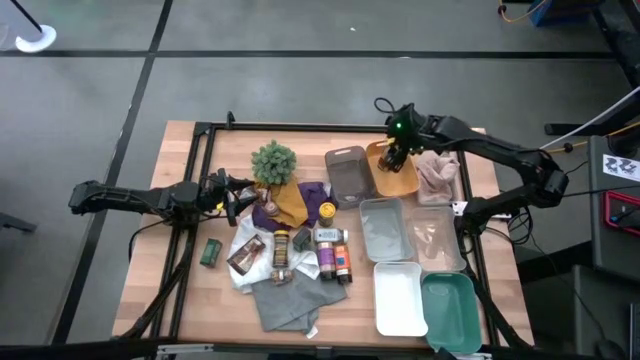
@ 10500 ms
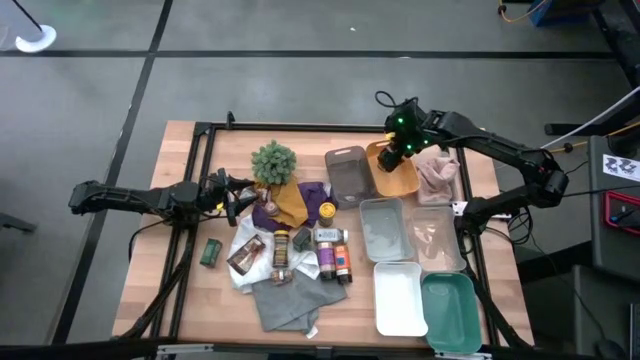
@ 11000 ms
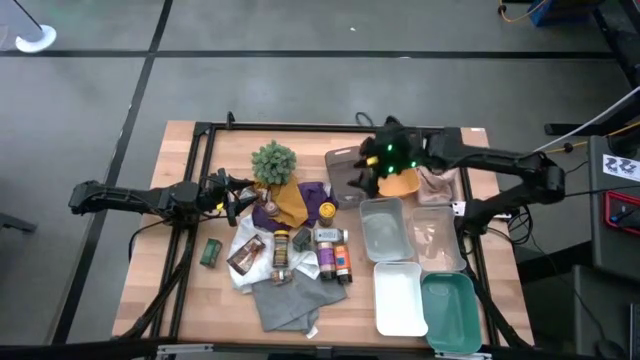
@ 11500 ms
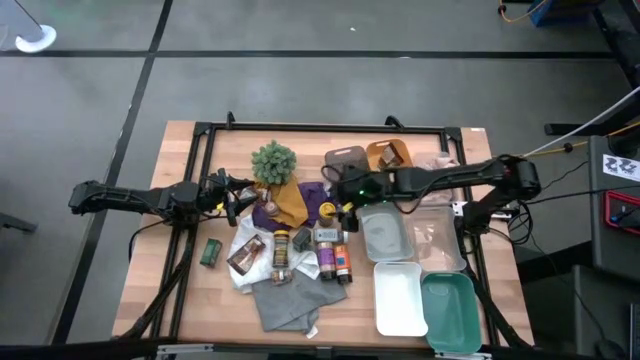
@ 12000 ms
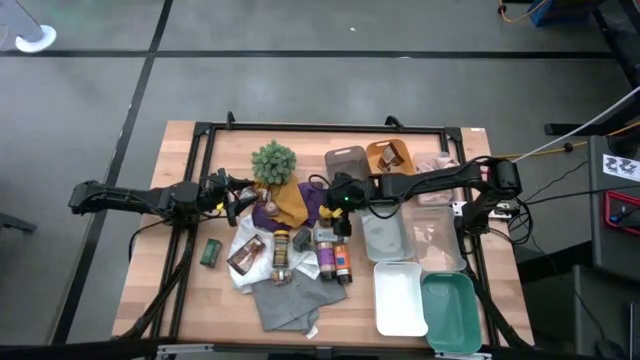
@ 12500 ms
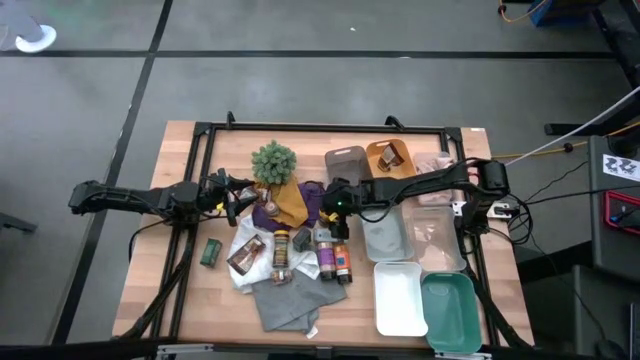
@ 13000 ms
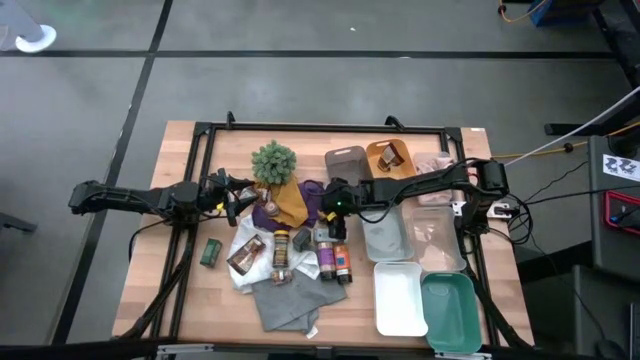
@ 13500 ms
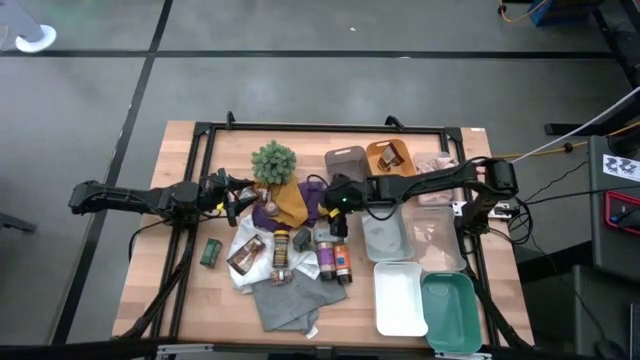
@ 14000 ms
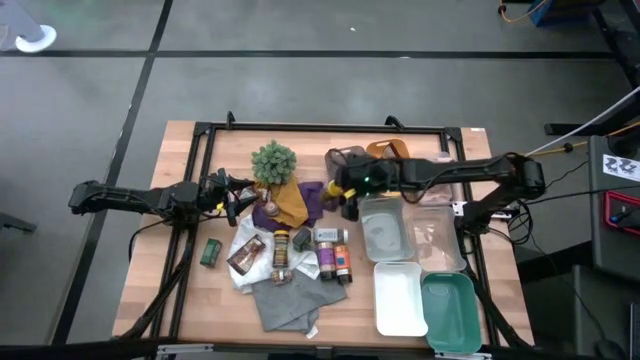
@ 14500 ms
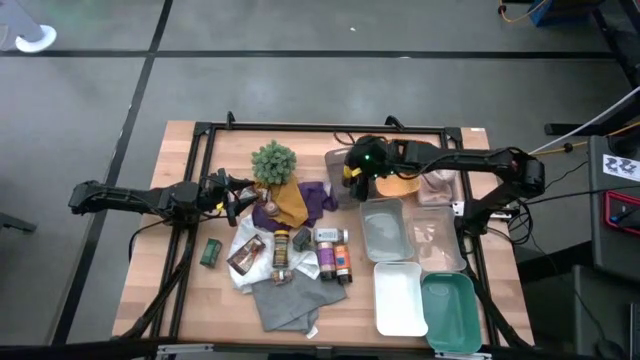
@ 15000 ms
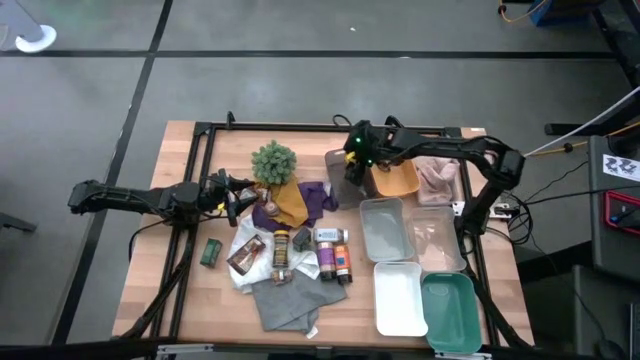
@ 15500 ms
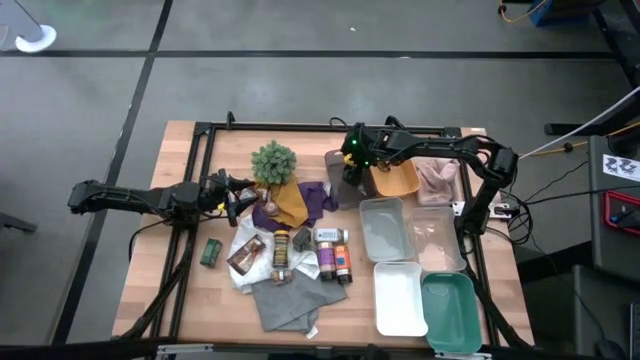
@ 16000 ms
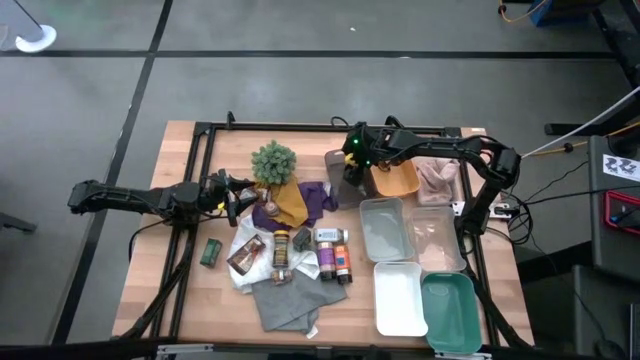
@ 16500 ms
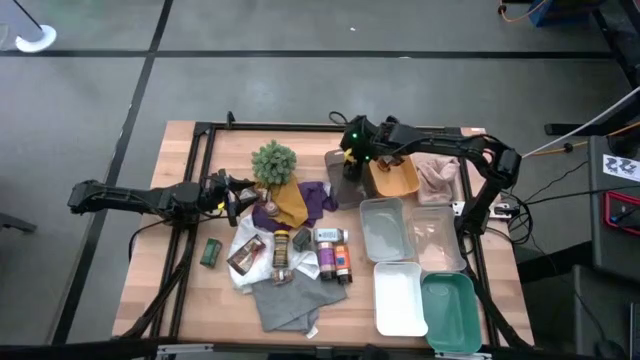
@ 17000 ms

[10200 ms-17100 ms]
Task: Sort spices by type
Put the right yellow seasoning bottle into the black bin

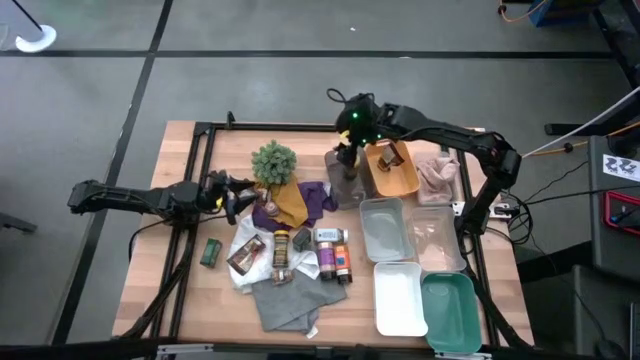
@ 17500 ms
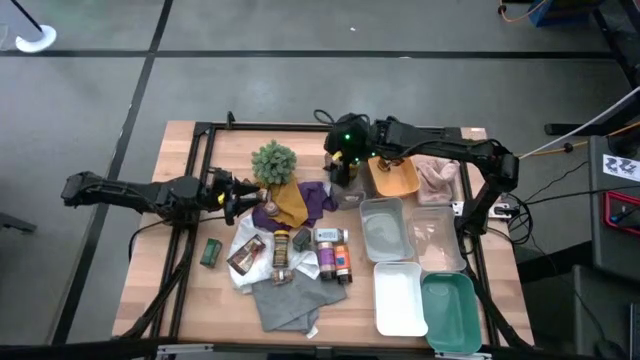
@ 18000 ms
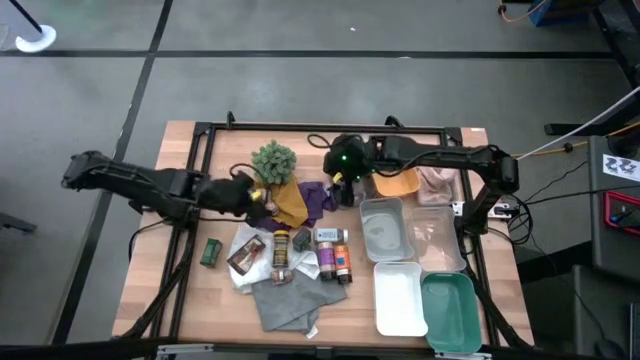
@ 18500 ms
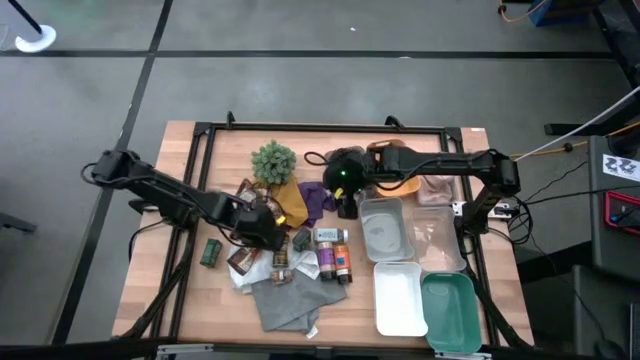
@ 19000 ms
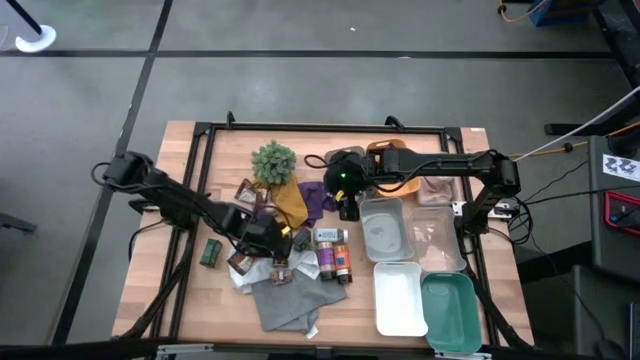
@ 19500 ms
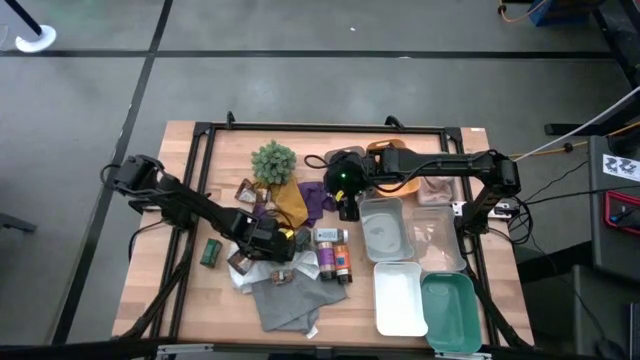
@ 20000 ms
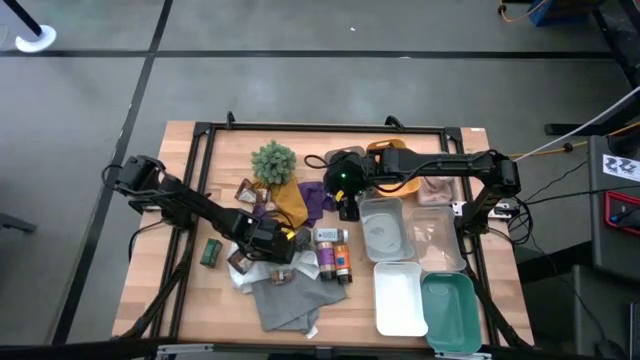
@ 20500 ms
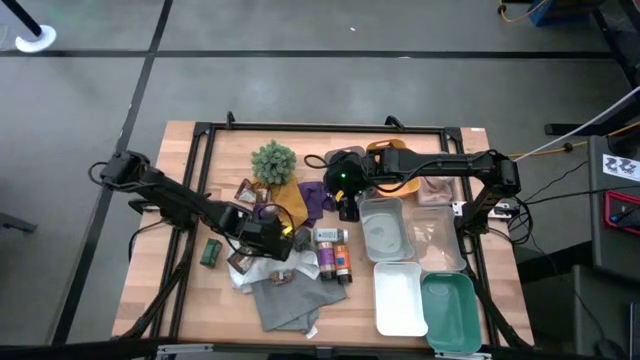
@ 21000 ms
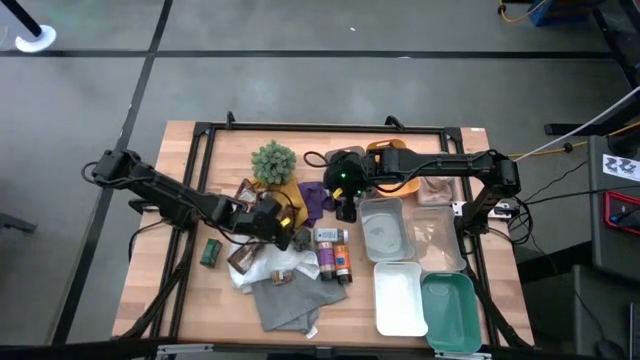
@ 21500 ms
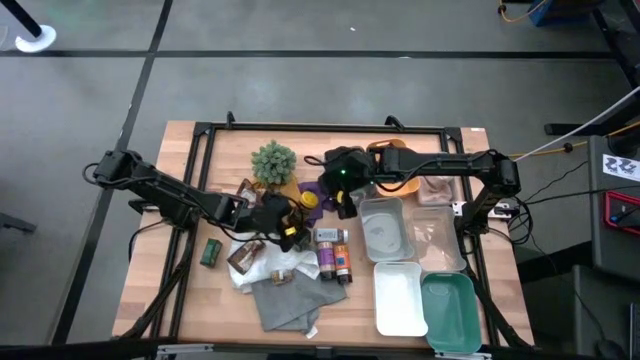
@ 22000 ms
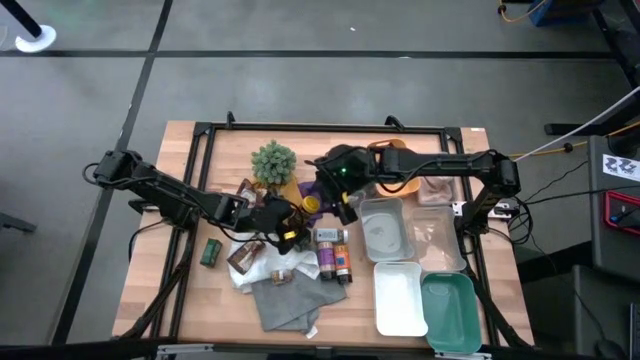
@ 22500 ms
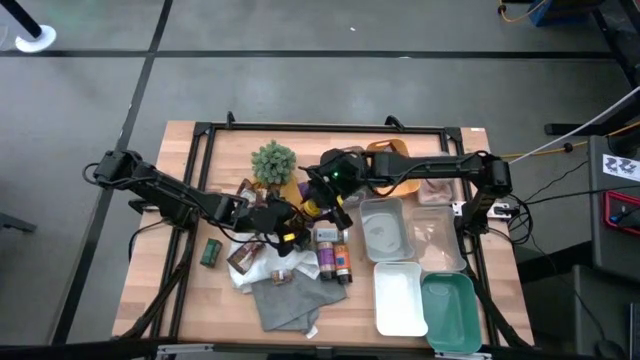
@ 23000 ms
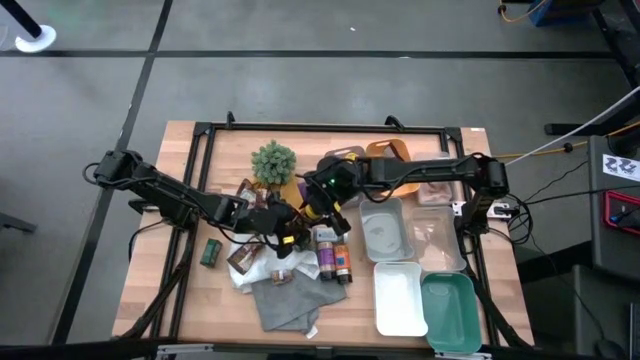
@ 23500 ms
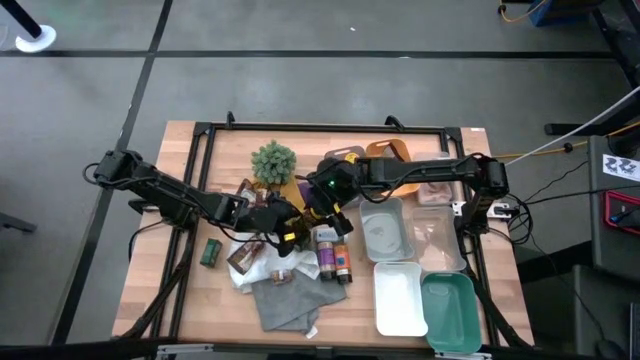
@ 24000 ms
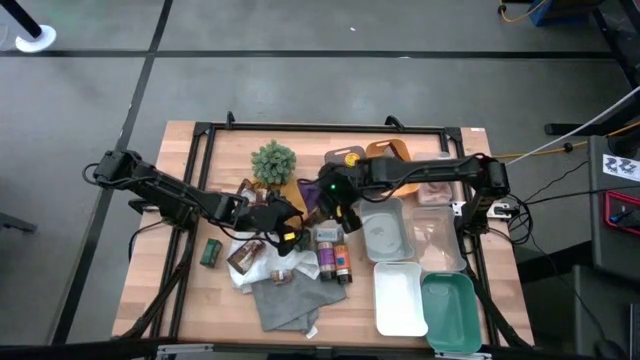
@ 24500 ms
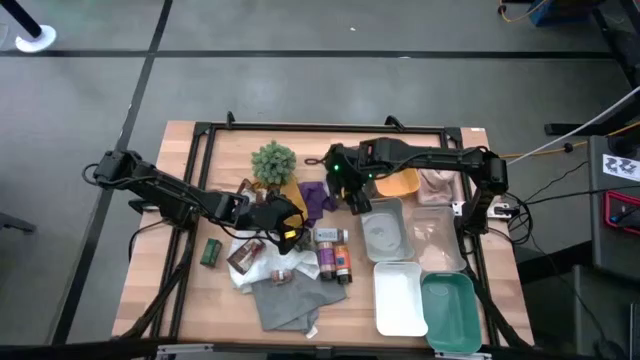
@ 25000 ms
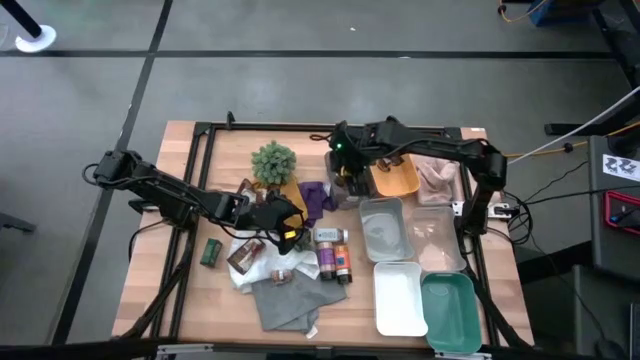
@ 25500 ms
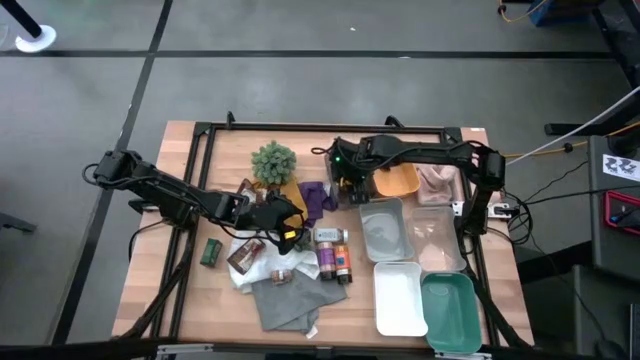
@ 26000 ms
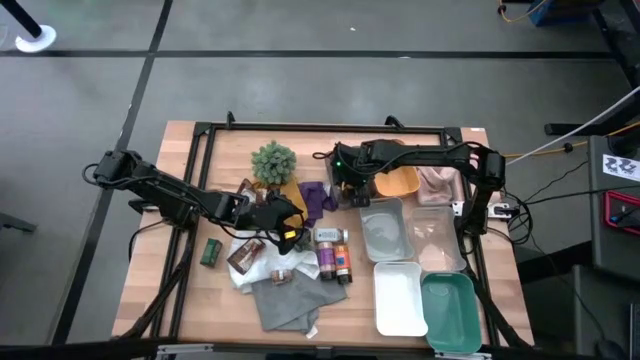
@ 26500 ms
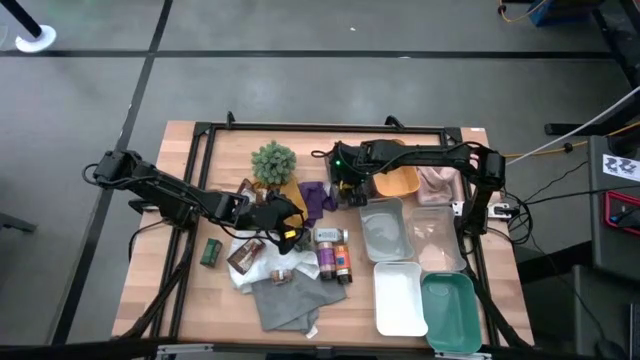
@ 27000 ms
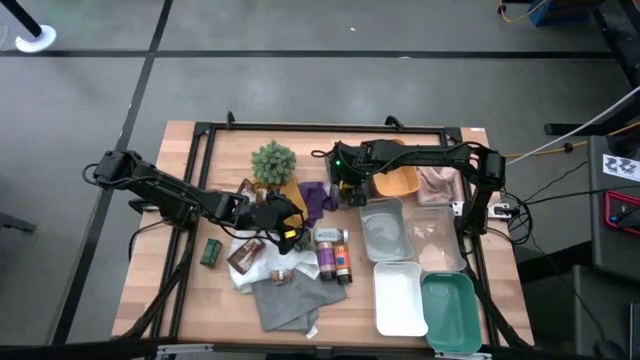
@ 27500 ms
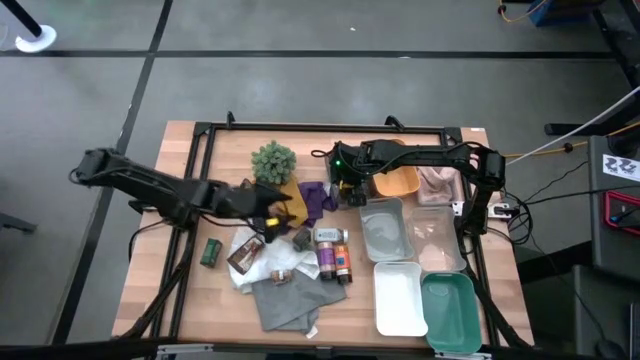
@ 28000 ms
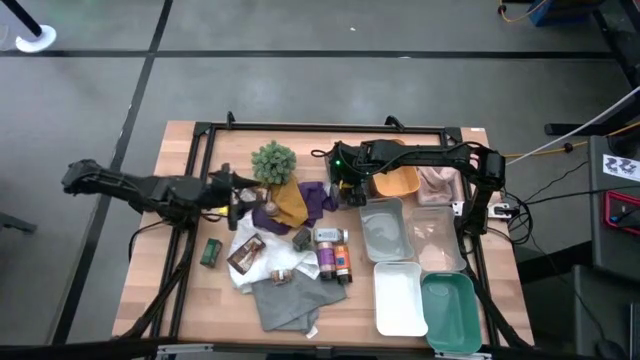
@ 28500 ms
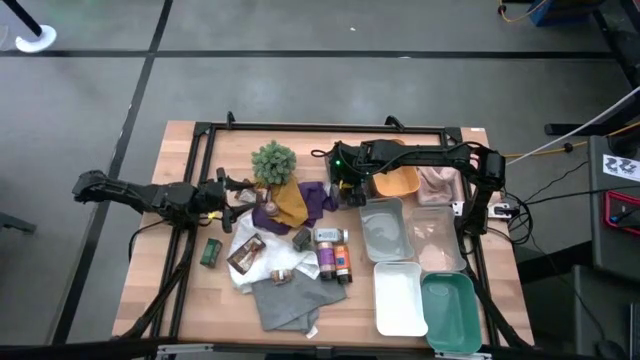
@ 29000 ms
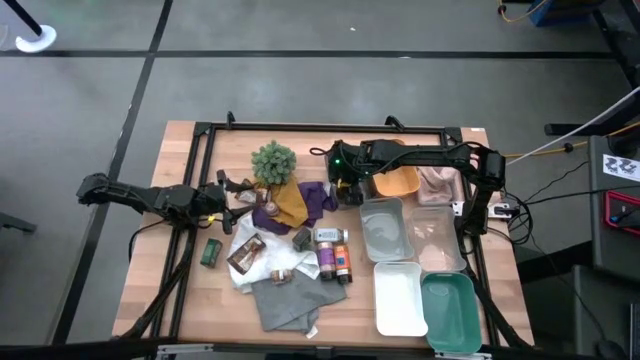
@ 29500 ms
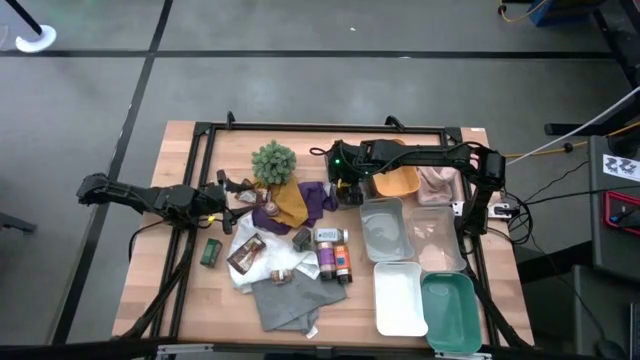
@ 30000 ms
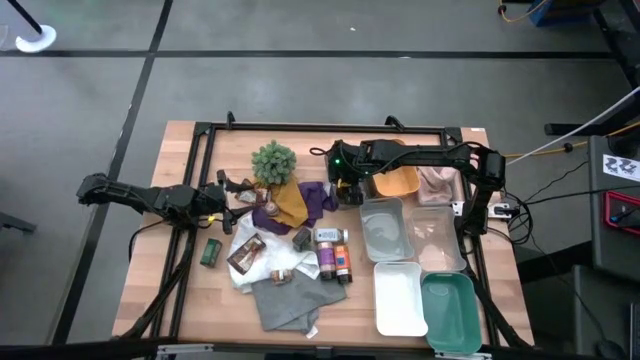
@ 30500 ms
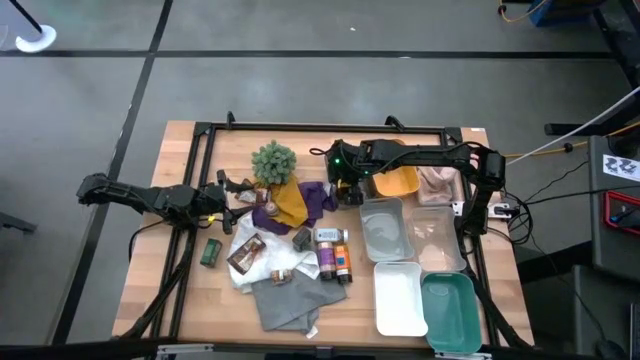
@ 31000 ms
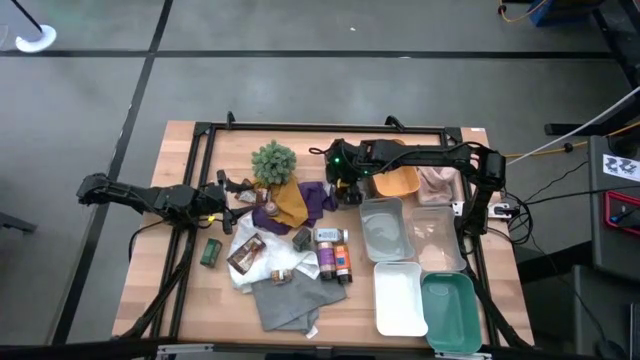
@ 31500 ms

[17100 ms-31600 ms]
Put the yellow seasoning bottle into the black bin
